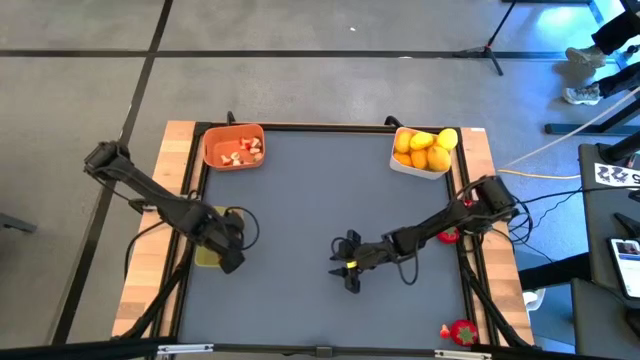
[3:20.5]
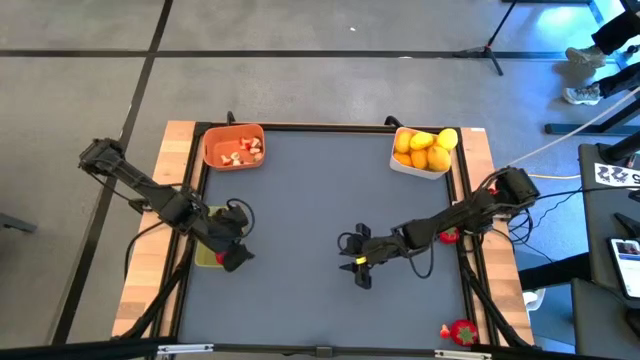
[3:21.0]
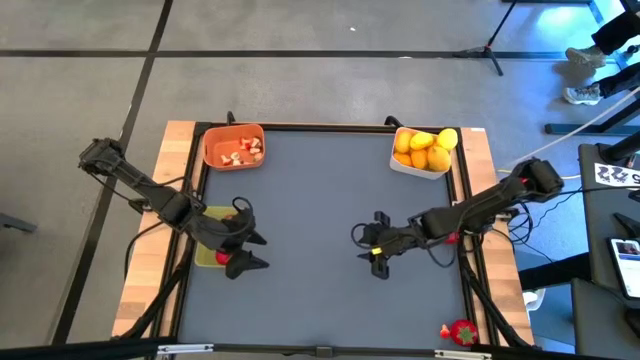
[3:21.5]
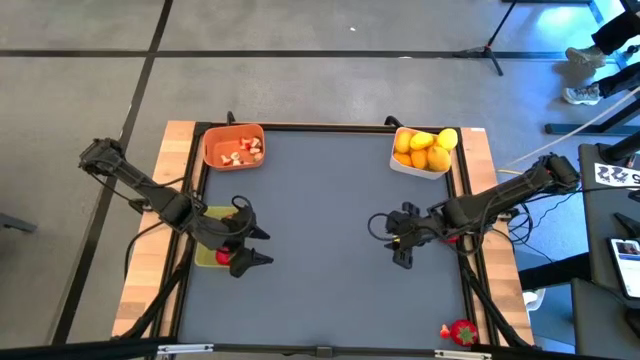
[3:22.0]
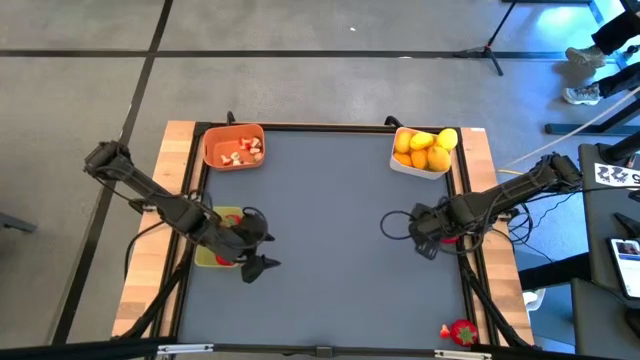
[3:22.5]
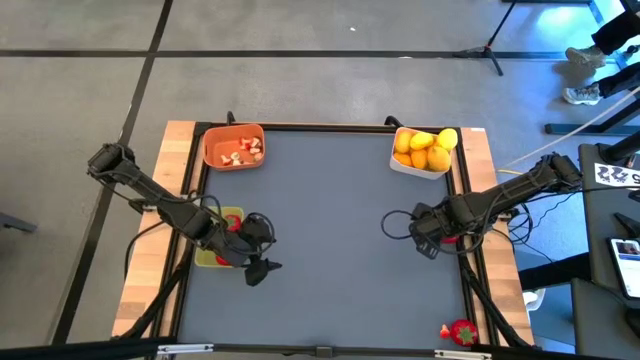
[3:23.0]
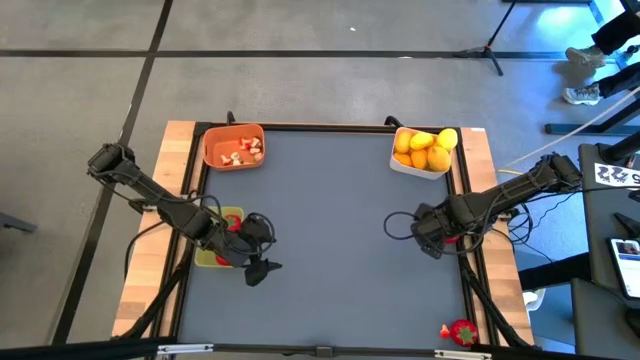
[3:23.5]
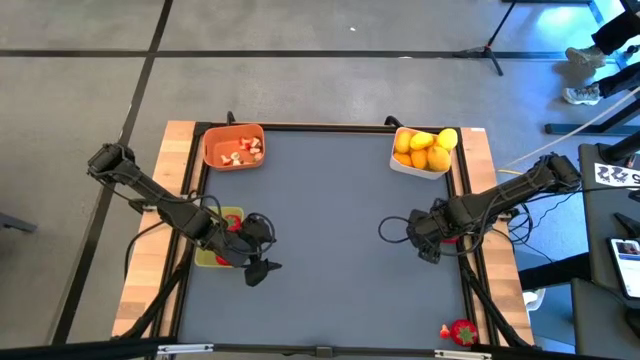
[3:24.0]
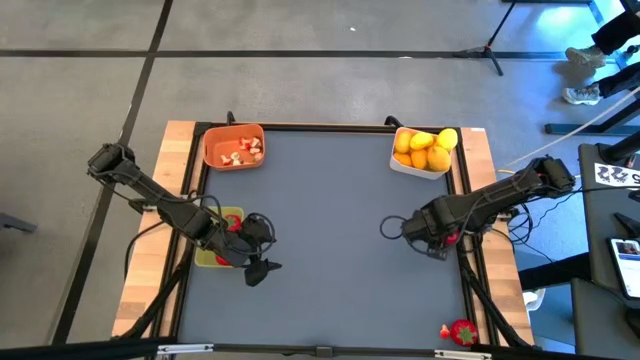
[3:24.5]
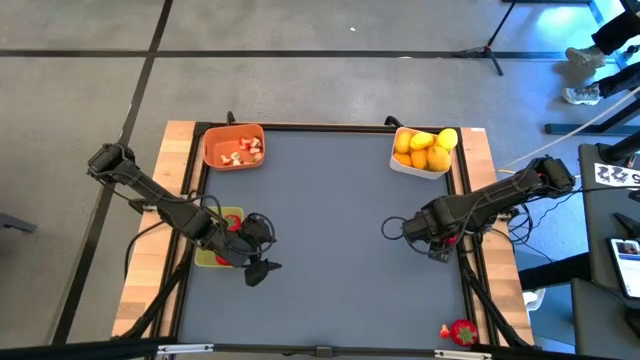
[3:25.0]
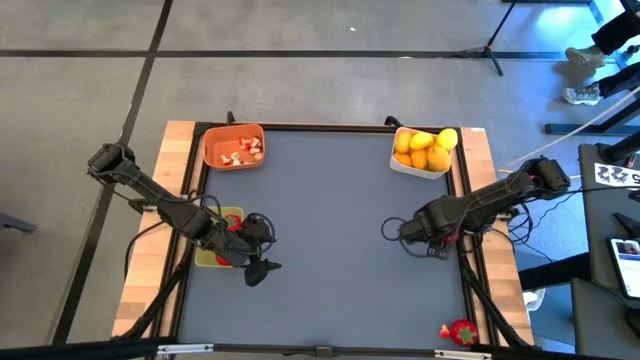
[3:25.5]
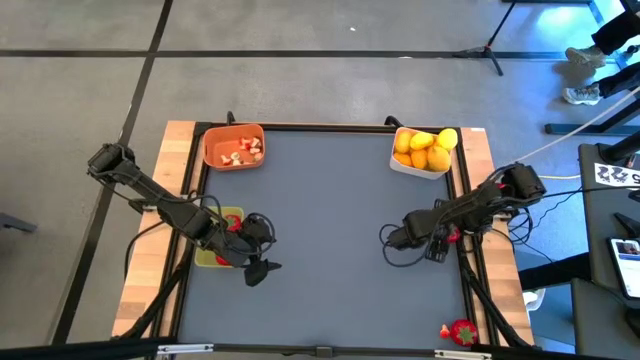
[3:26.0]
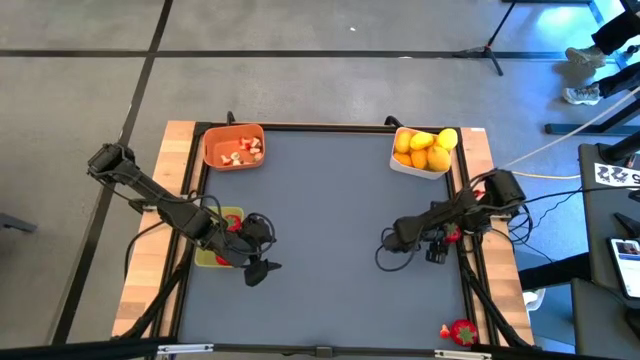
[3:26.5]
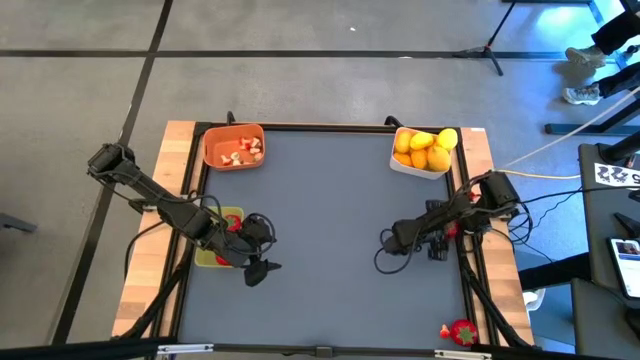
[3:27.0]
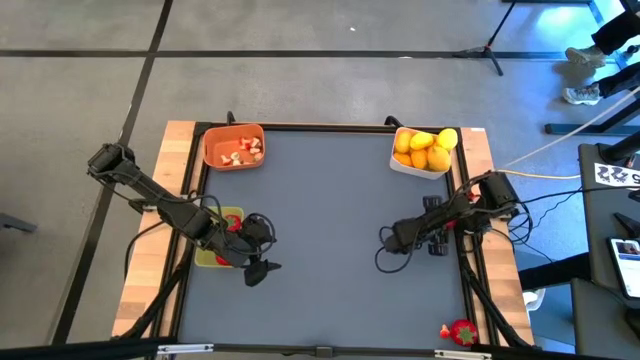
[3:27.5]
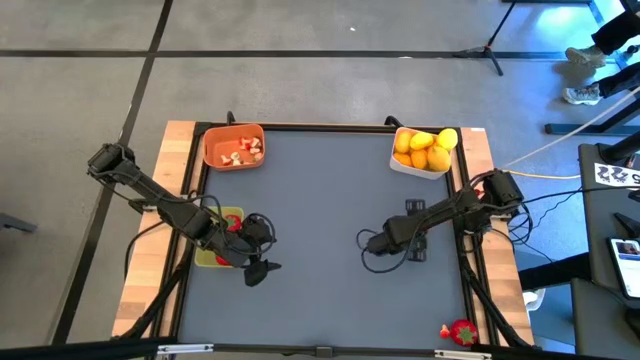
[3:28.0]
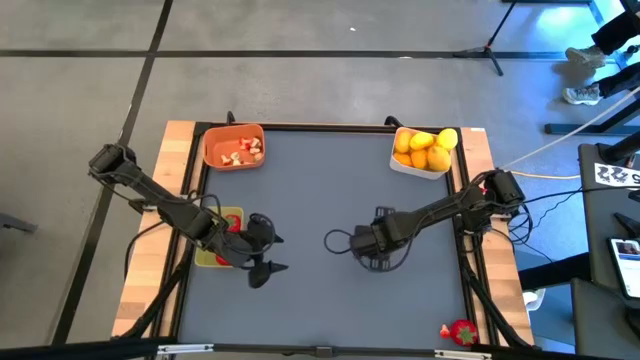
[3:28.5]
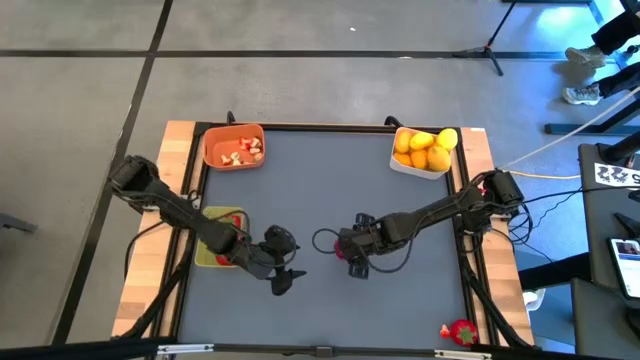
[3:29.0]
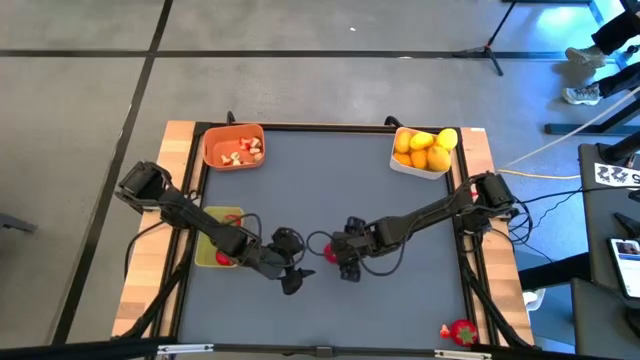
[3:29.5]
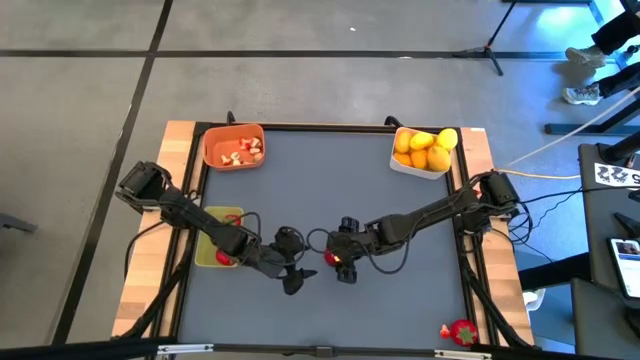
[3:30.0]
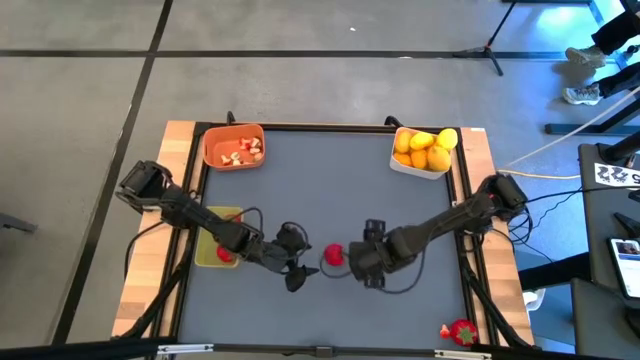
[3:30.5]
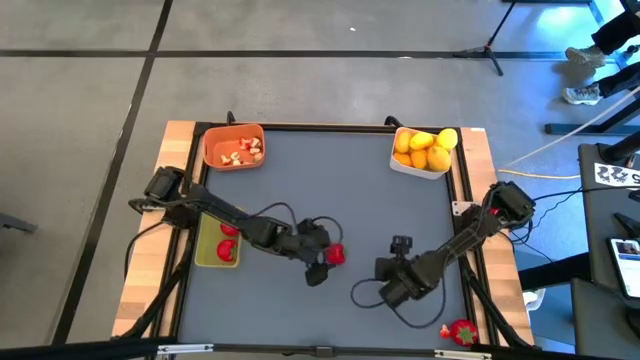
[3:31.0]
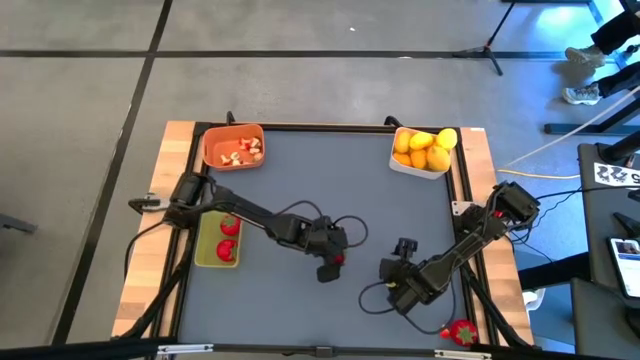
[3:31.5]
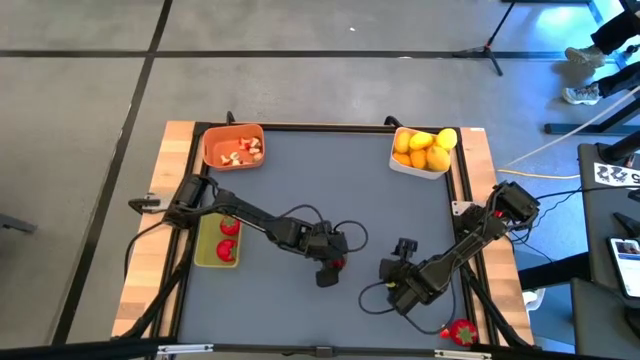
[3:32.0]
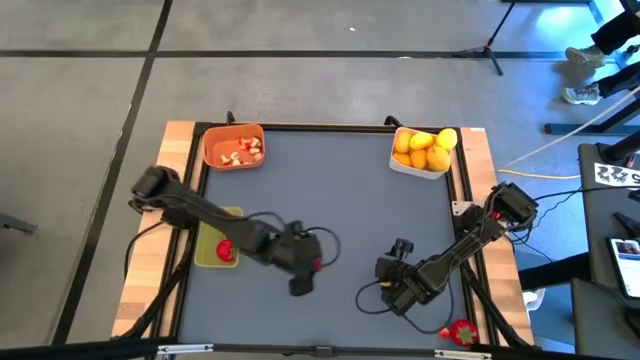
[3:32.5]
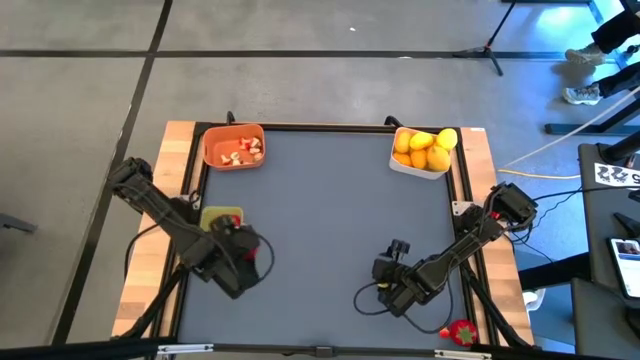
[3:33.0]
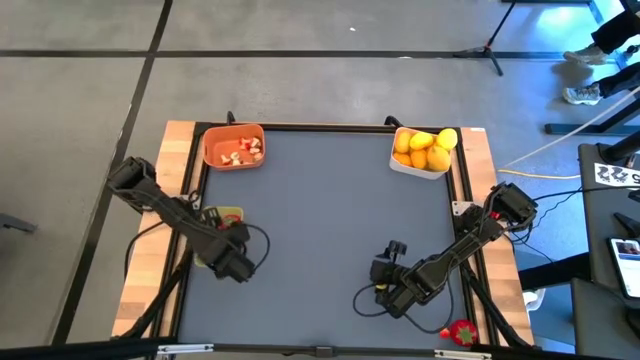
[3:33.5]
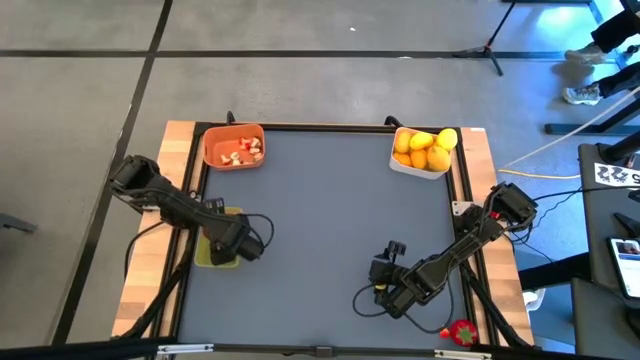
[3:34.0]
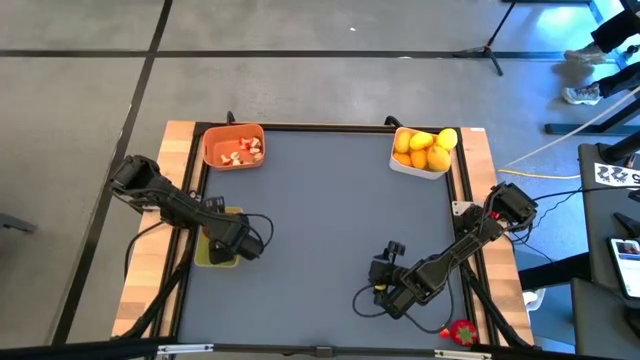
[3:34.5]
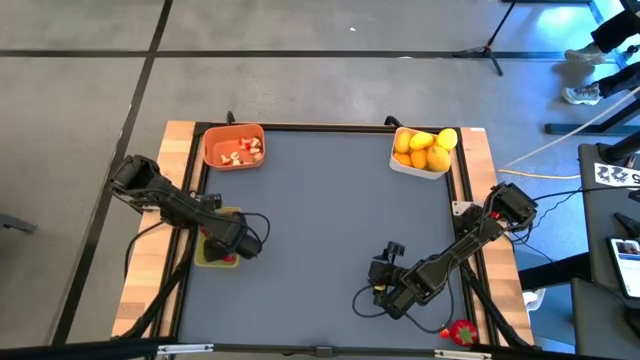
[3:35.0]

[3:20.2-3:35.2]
Task: Sort produce into baskets
Put the red tomato into the yellow bin

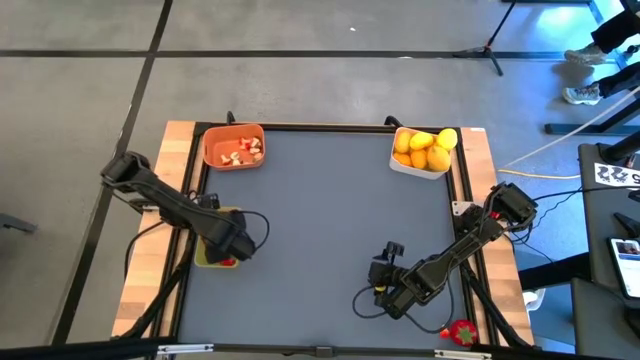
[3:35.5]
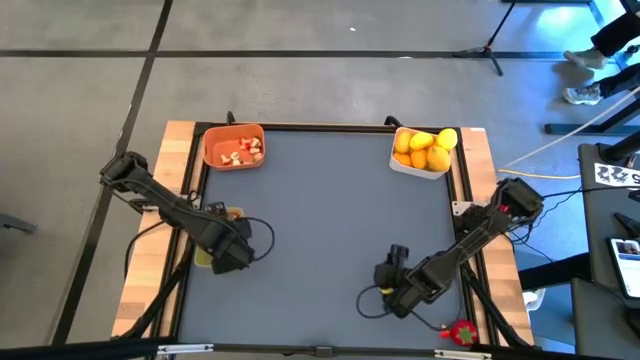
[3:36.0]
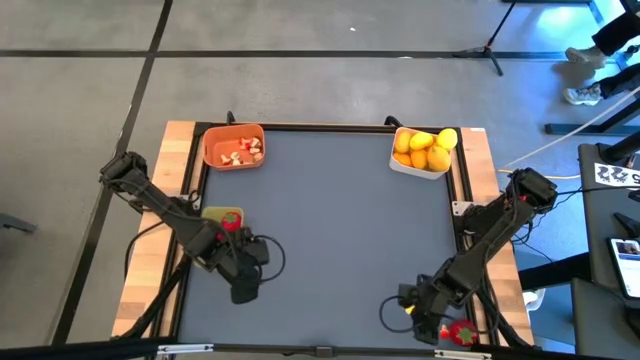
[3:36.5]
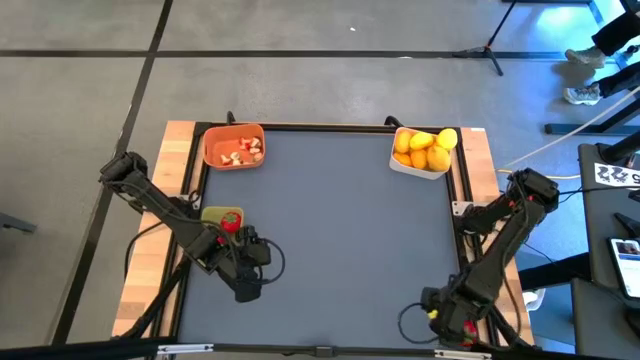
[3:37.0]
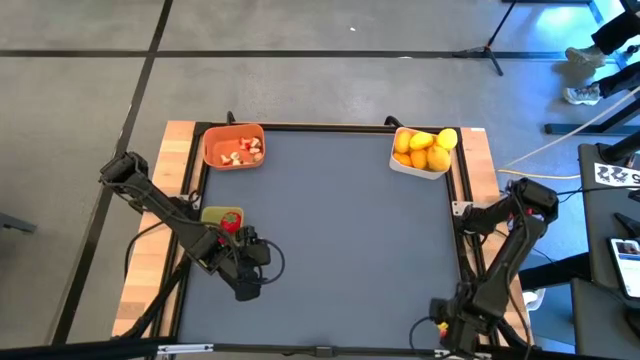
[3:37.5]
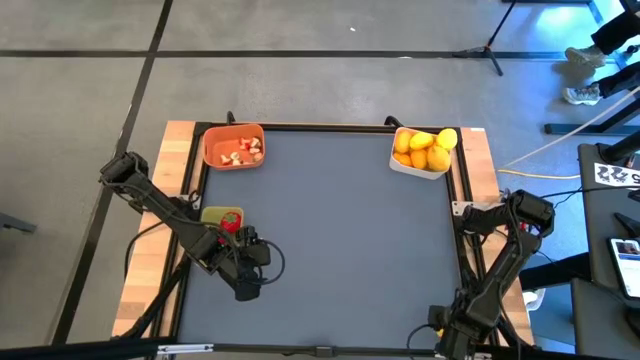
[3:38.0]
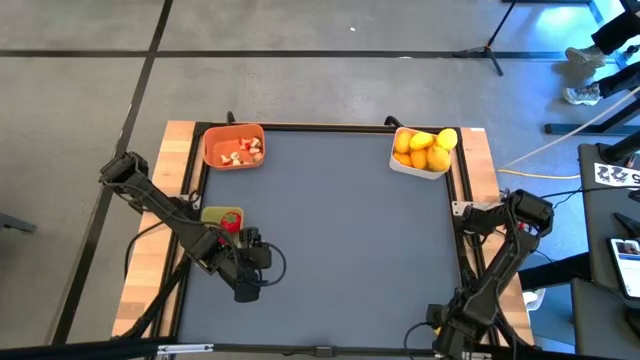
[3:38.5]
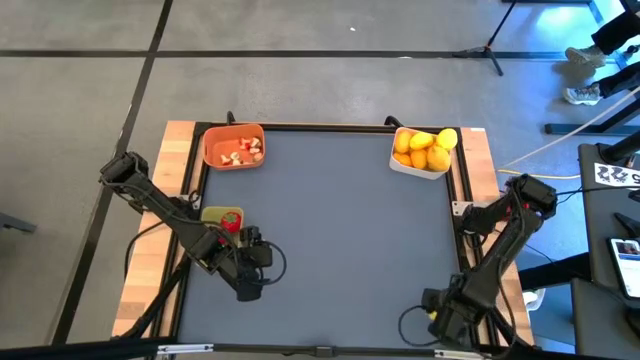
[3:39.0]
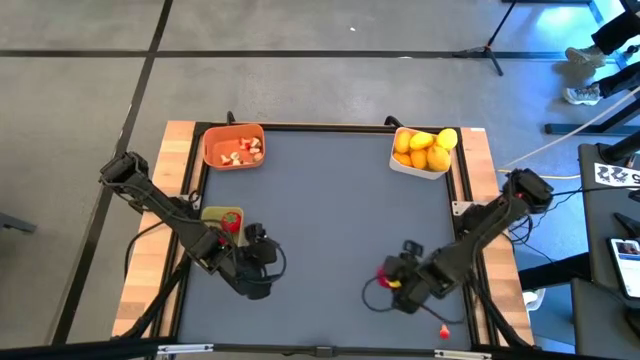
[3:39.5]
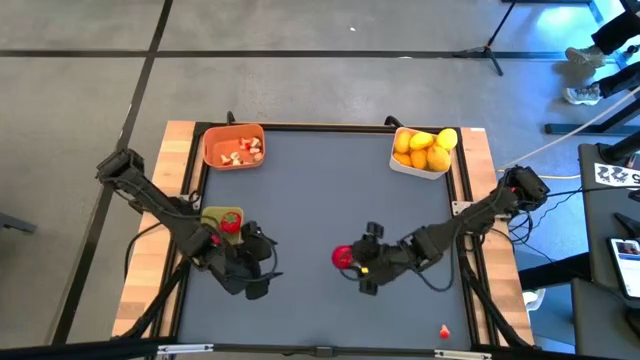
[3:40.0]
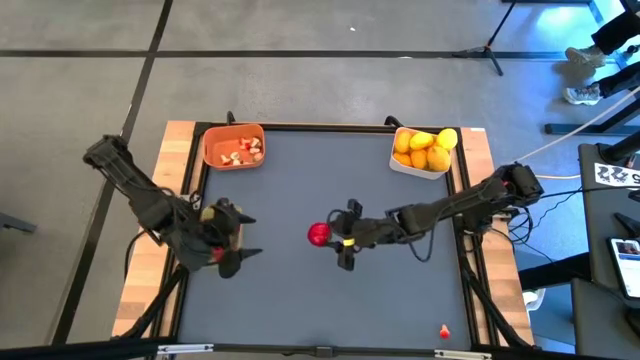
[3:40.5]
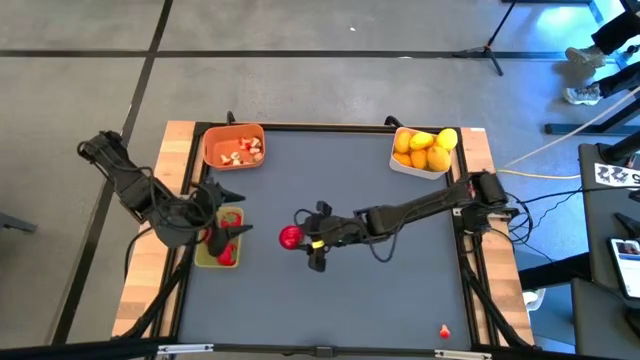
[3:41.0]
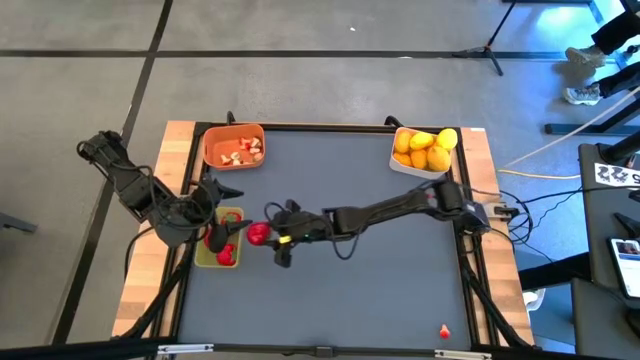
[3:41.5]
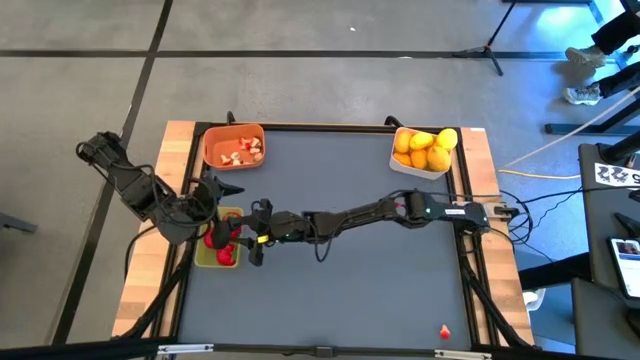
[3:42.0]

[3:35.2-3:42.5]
Put the red tomato into the yellow bin

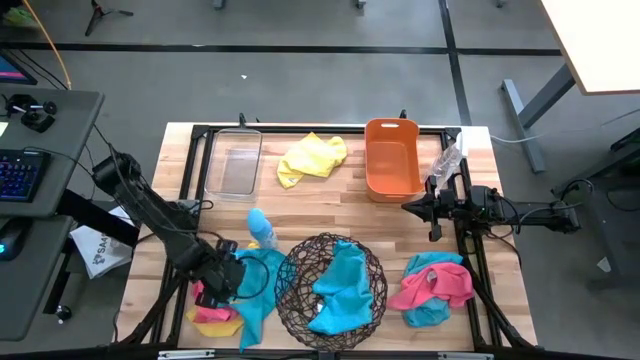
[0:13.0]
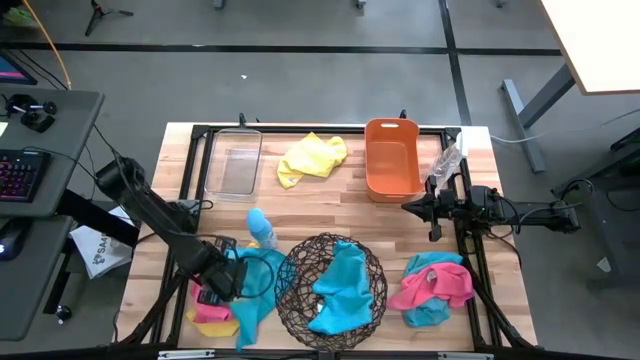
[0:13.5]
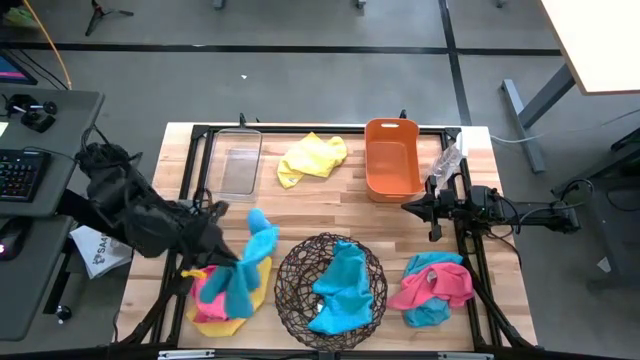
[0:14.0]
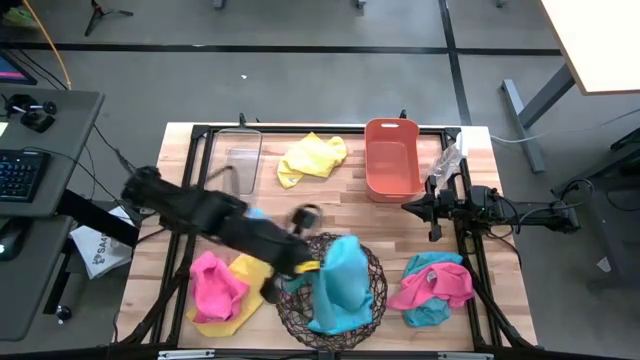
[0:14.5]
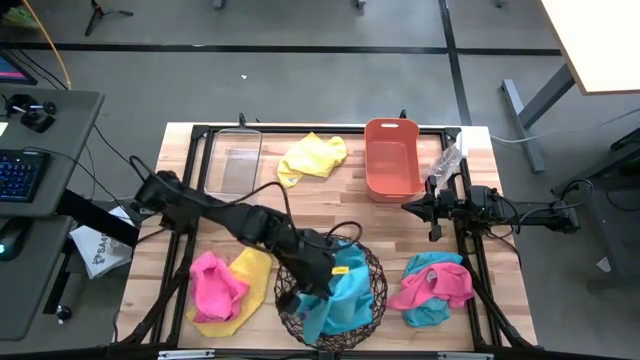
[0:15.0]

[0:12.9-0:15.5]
Task: Sort microfiber towel by color & place in baskets
Put the right blue towel into the wooden basket
